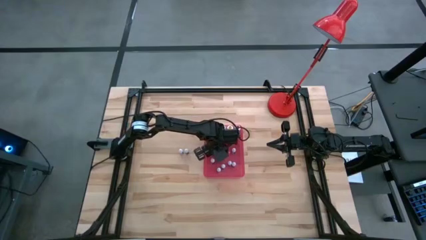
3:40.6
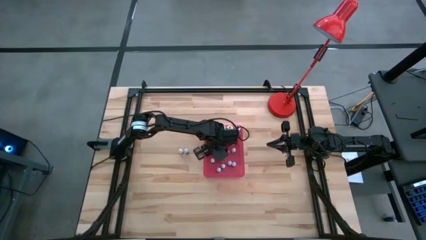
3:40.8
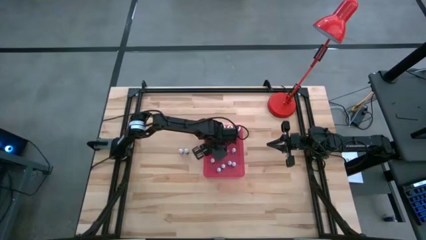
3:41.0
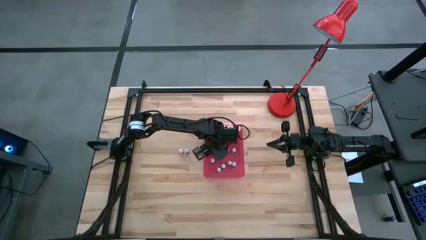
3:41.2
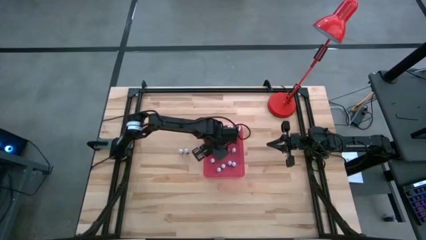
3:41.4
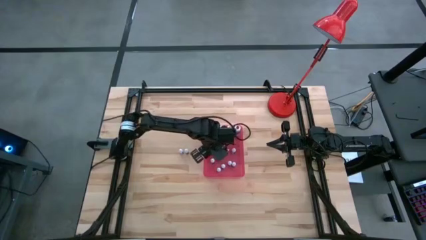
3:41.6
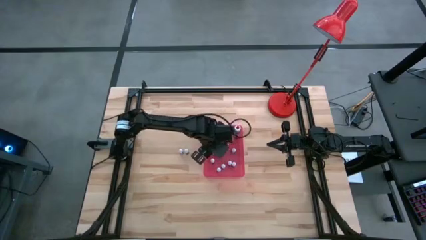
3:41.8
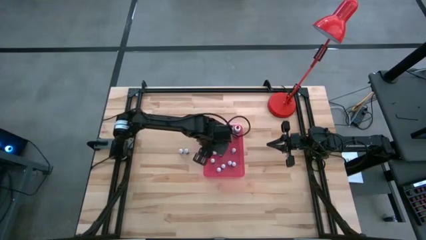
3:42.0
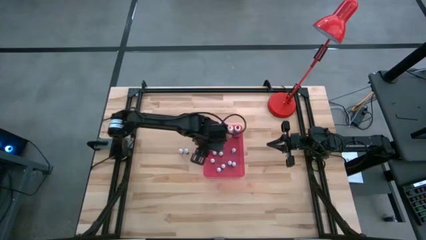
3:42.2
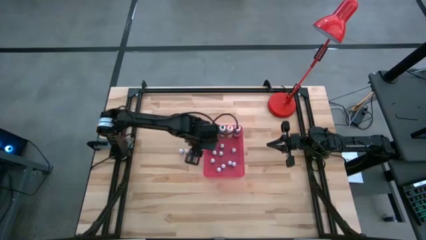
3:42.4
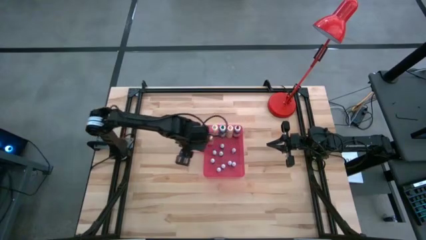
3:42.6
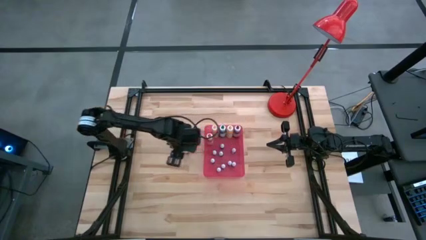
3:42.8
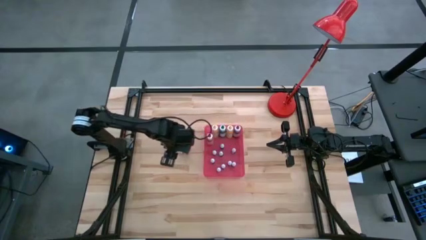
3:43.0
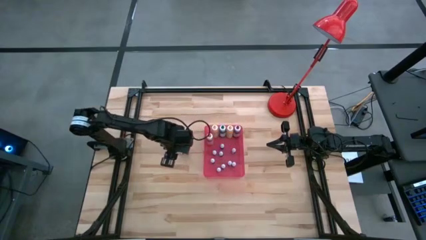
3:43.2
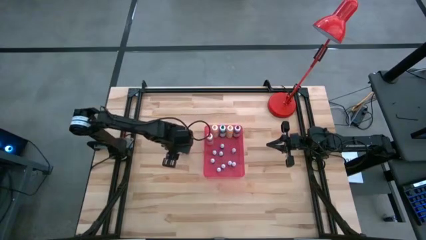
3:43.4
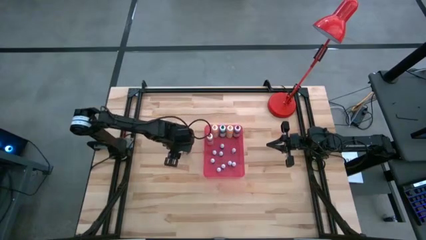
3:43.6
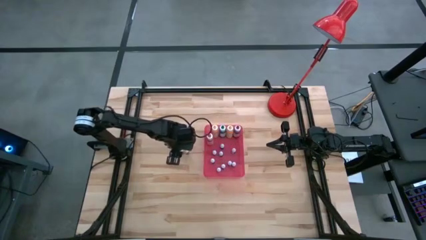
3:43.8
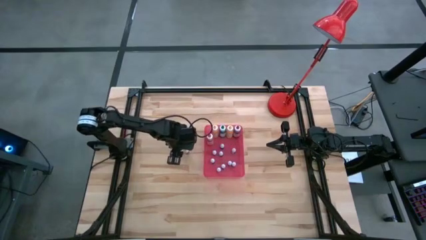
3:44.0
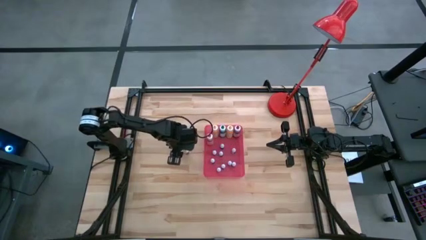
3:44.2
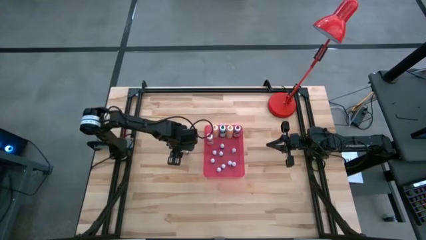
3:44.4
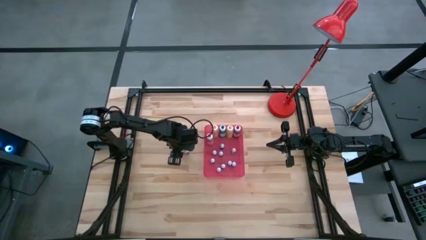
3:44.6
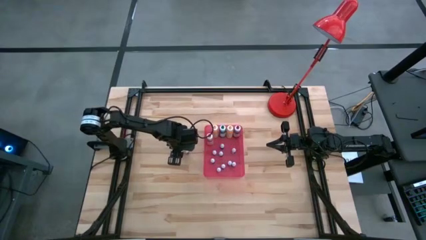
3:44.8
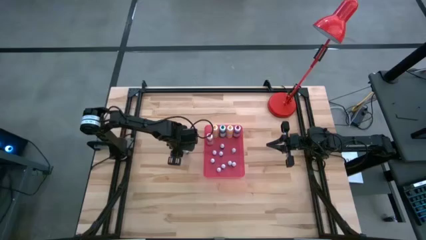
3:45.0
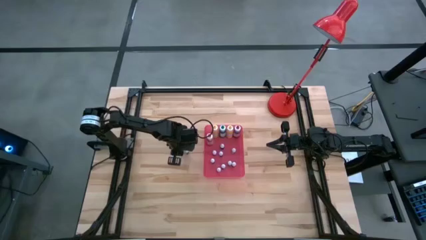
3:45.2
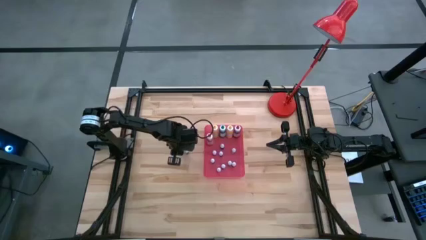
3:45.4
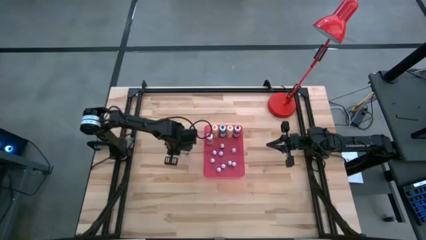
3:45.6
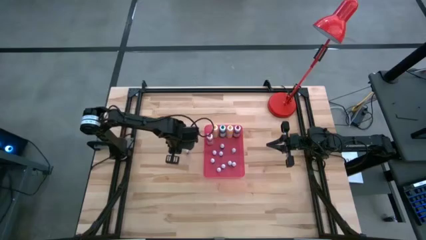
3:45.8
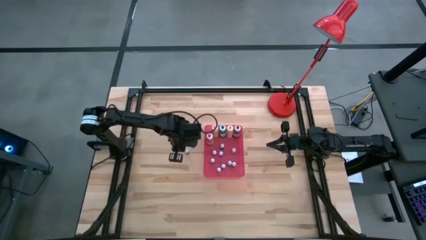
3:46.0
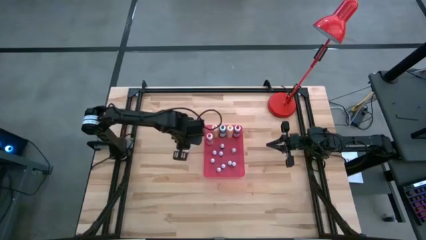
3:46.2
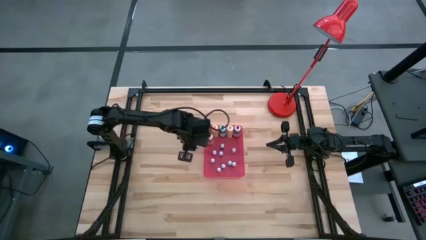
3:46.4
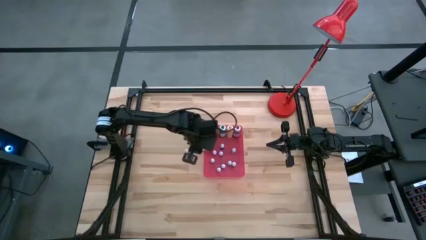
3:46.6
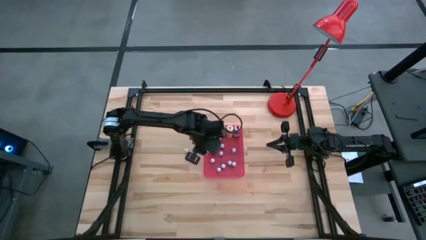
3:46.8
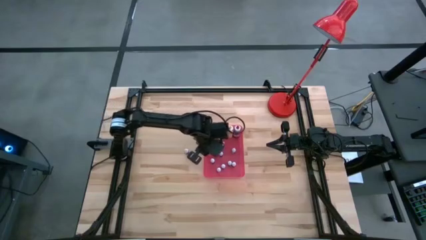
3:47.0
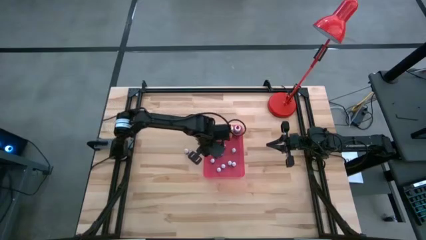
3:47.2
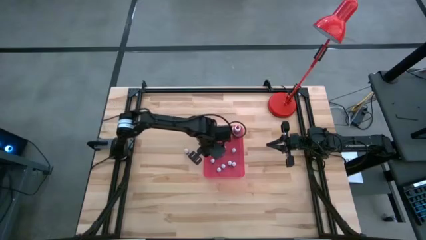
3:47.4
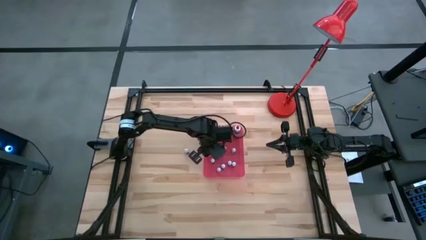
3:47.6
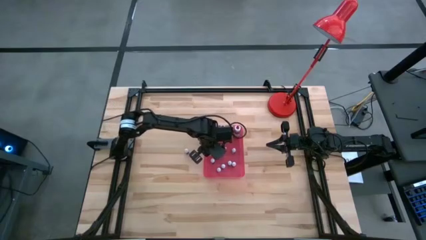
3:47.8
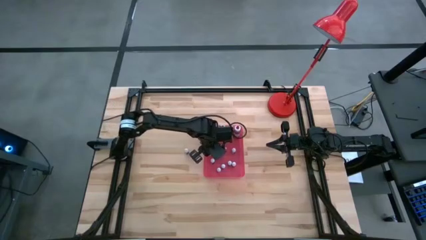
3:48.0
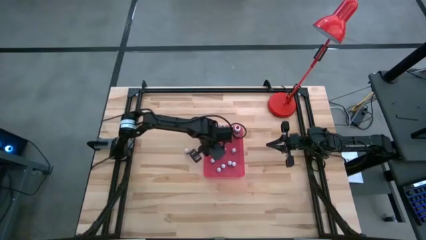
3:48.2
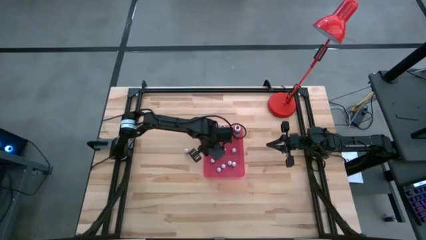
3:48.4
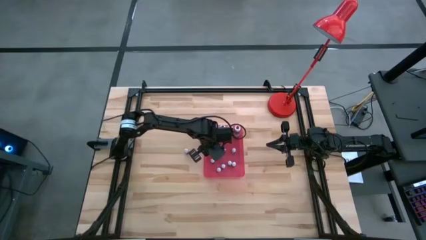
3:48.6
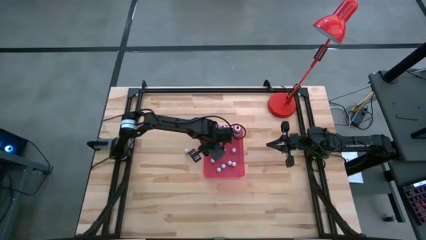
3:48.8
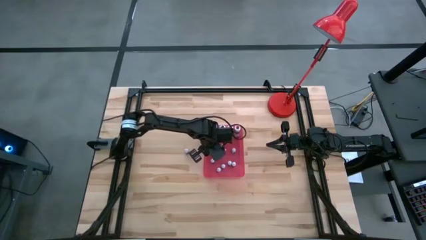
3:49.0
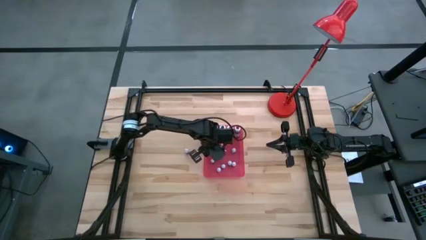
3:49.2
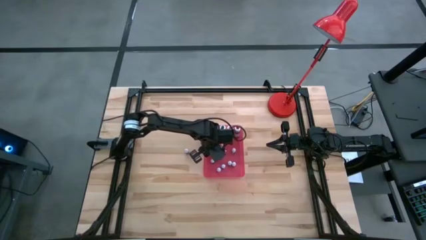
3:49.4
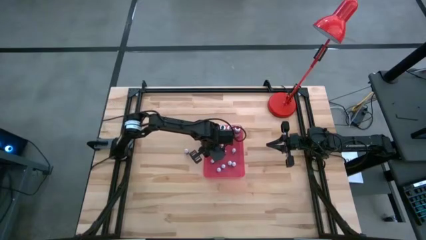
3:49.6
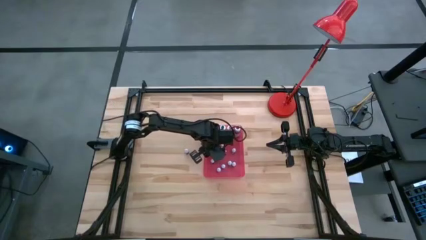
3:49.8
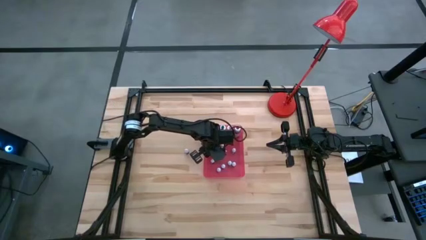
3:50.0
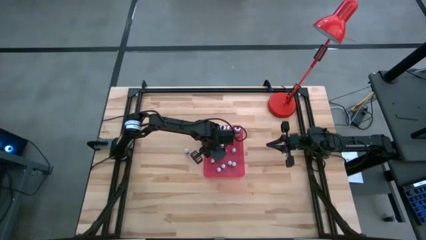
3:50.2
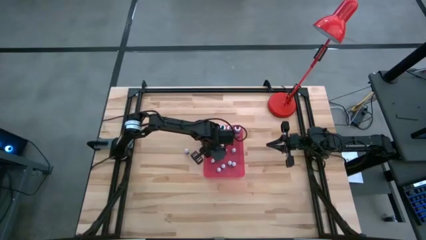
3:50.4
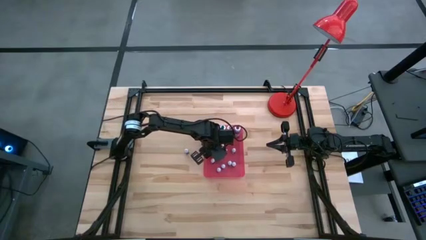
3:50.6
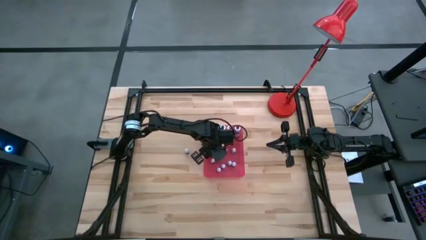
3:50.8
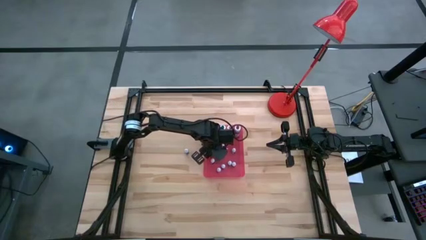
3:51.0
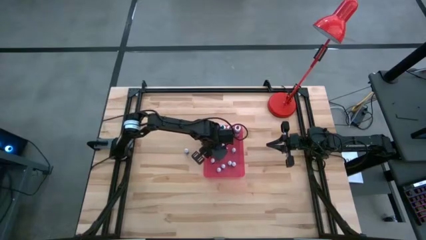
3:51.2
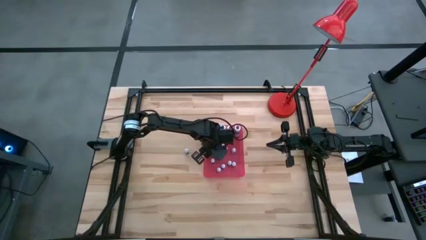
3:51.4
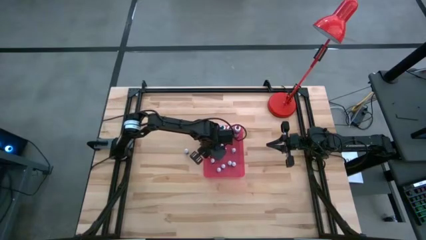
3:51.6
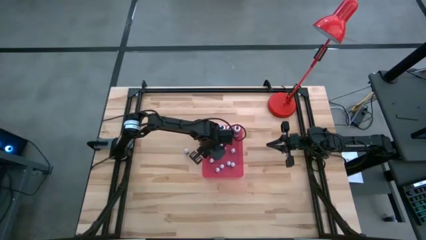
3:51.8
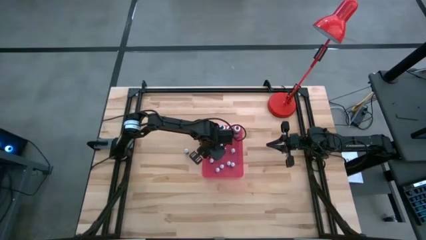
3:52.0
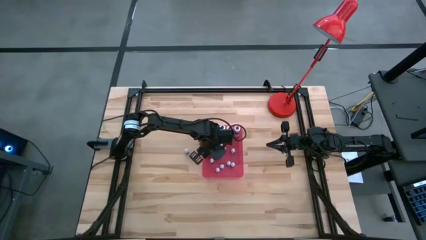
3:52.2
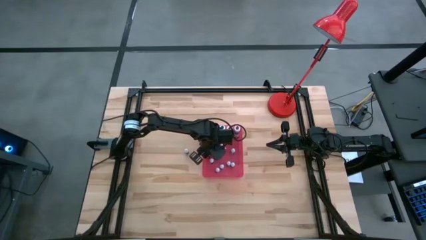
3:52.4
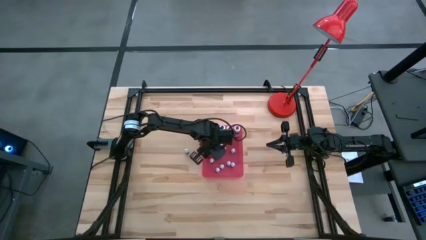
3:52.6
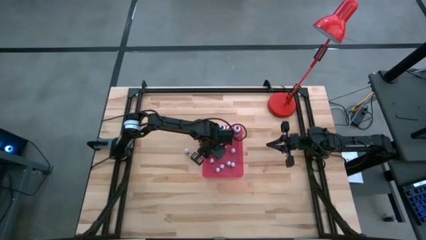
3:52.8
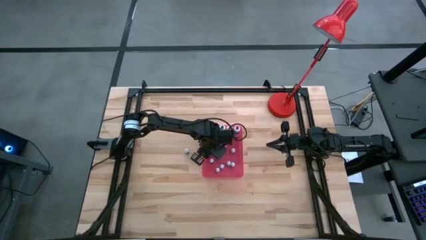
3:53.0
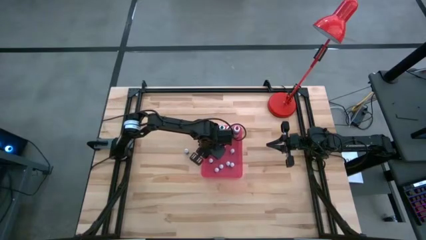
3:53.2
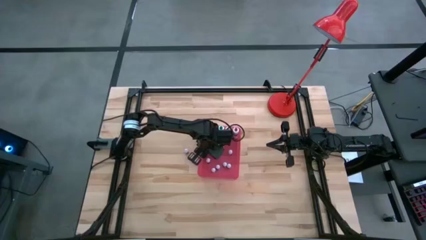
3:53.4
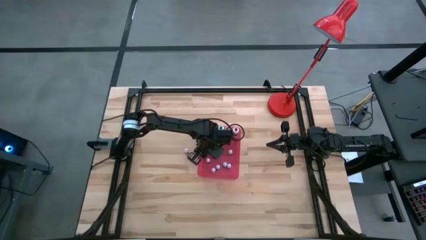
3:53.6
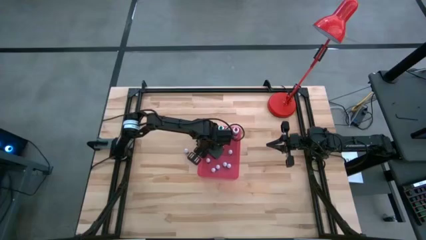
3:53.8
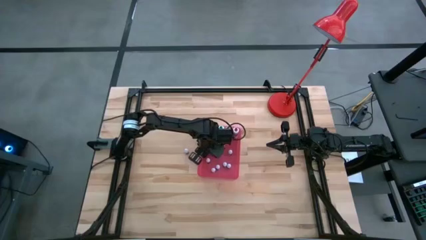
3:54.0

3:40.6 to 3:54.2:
Task: Pick & Place food coloring
Put the small food coloring bottle into the red bin

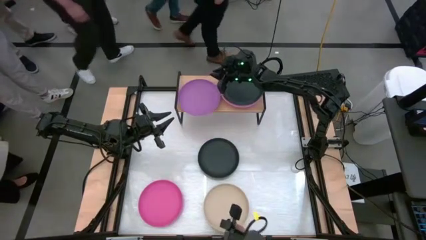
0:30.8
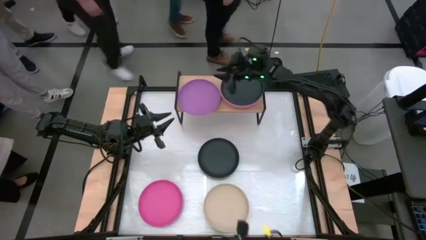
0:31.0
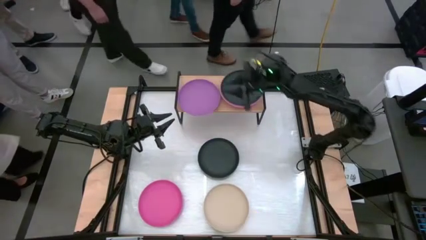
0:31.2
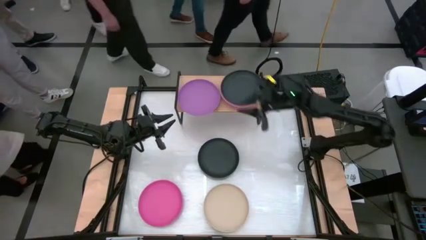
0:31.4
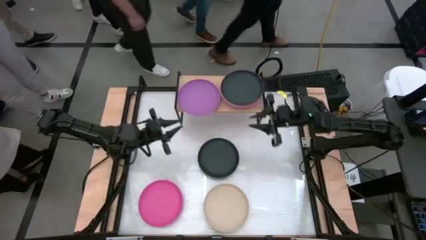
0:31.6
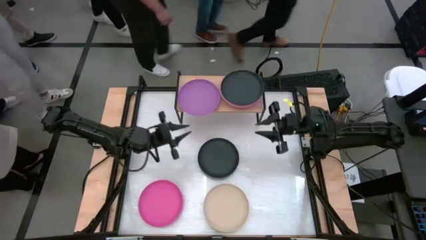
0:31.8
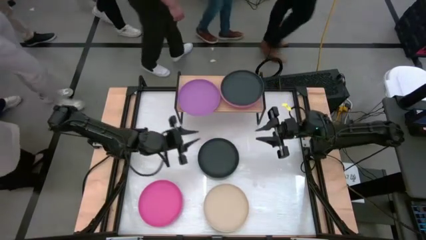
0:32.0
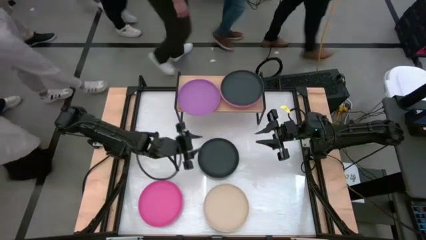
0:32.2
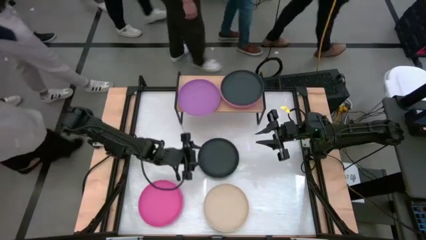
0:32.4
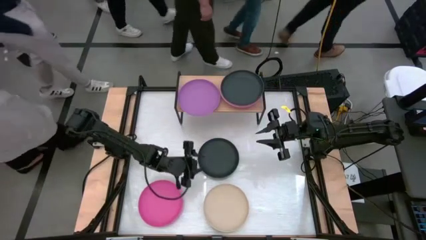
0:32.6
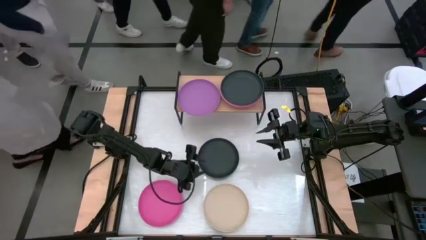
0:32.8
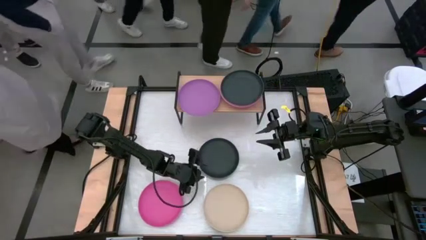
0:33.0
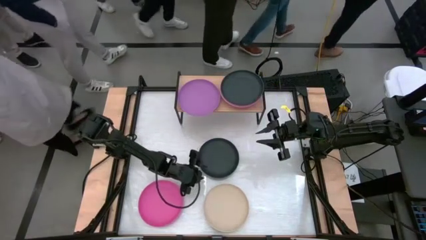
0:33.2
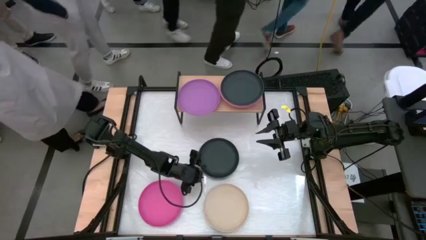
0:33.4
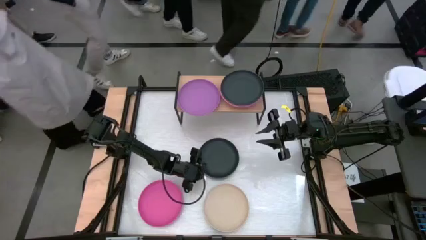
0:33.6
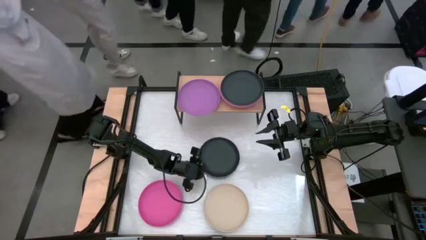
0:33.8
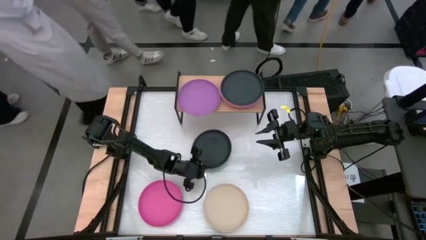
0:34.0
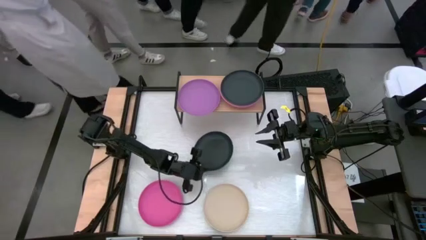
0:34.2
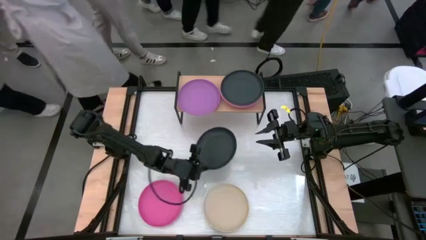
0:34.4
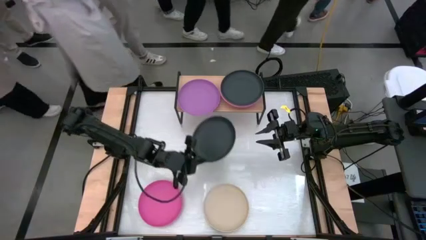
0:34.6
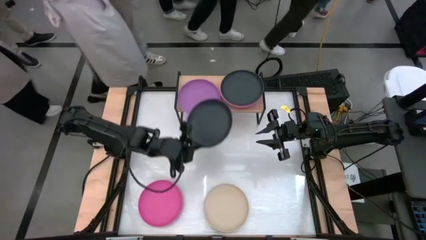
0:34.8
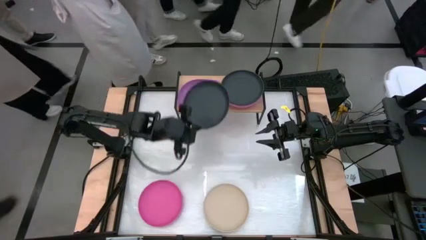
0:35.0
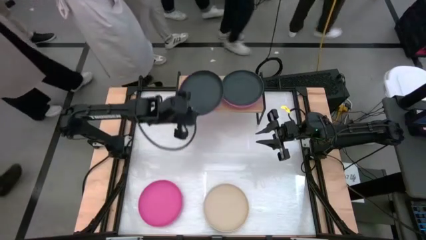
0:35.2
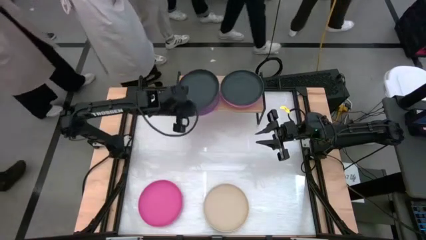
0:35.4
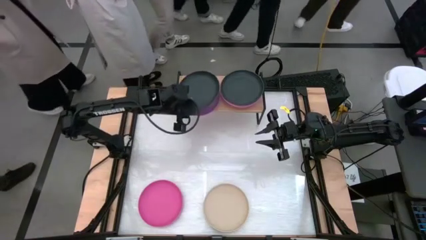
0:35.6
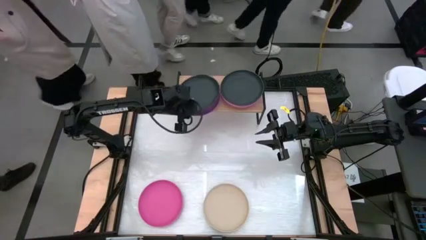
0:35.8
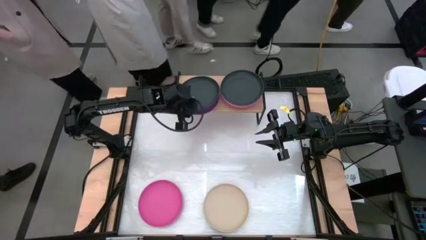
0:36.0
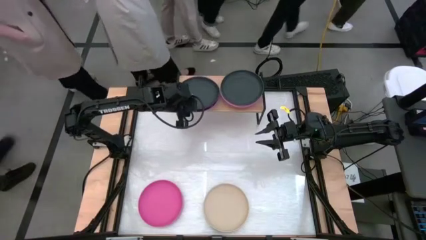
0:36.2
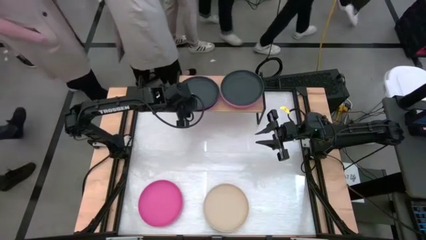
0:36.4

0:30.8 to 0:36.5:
Task: Place and stack plates onto a shelf
Stack the black plate on top of the purple plate on the shelf
